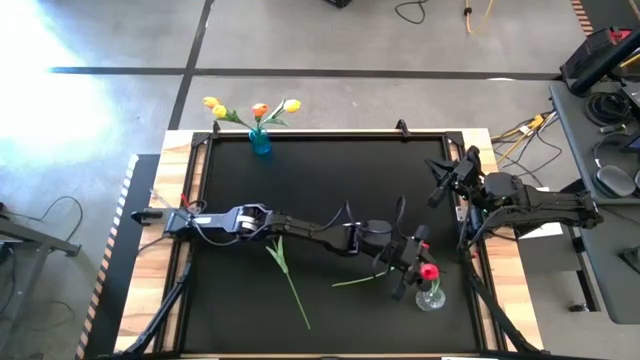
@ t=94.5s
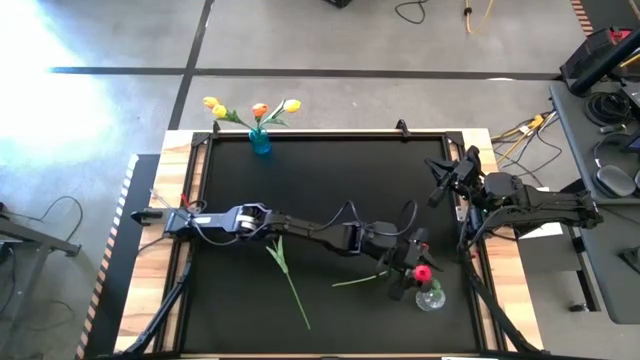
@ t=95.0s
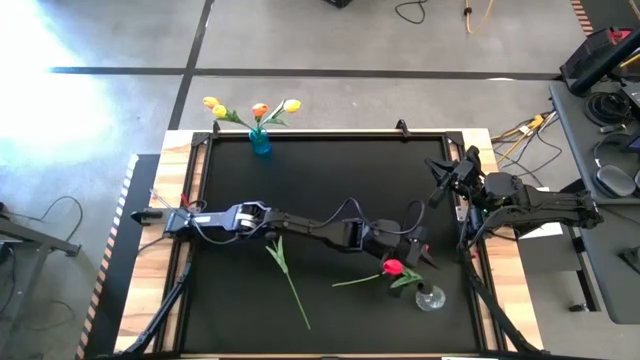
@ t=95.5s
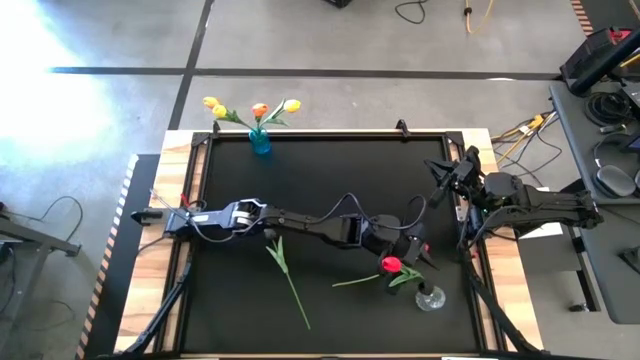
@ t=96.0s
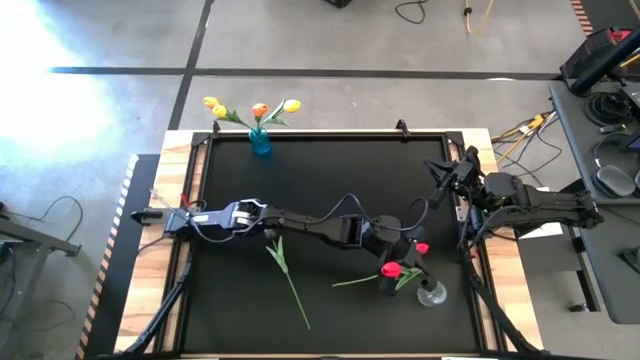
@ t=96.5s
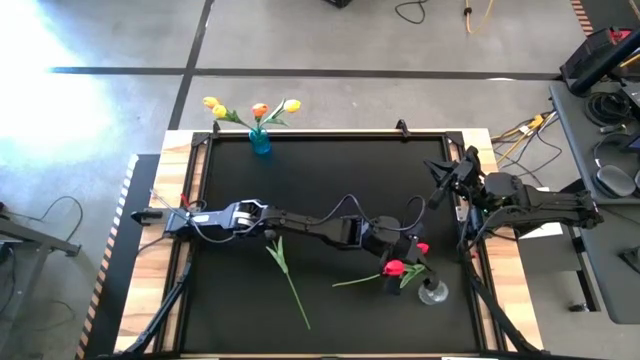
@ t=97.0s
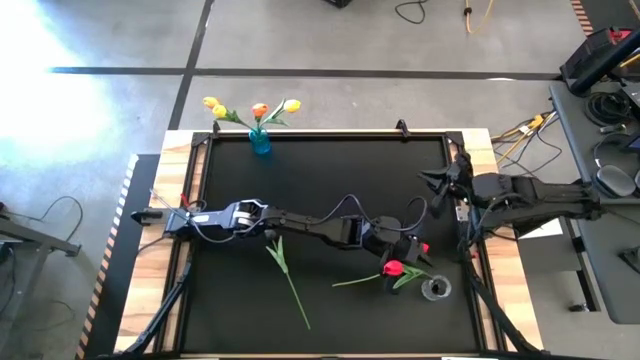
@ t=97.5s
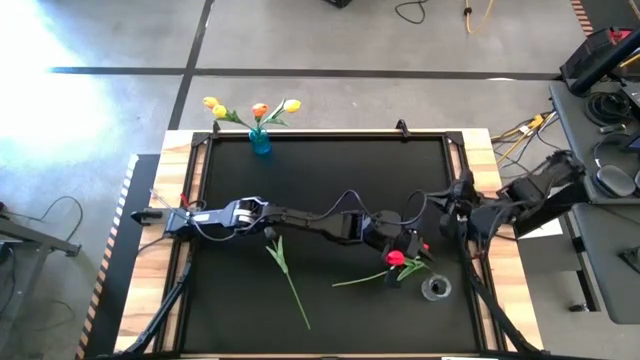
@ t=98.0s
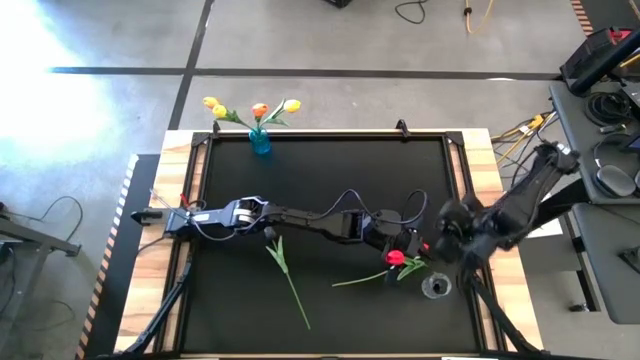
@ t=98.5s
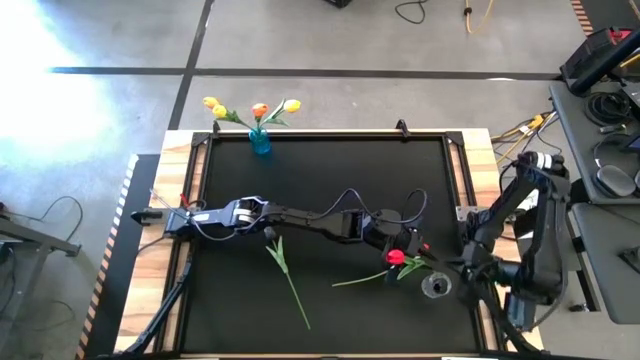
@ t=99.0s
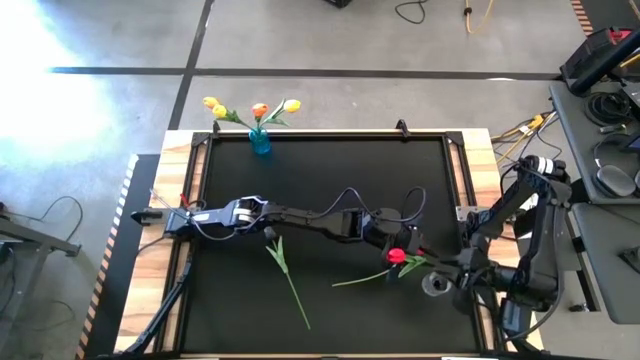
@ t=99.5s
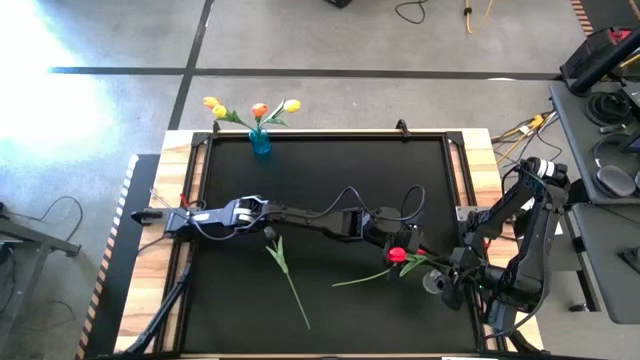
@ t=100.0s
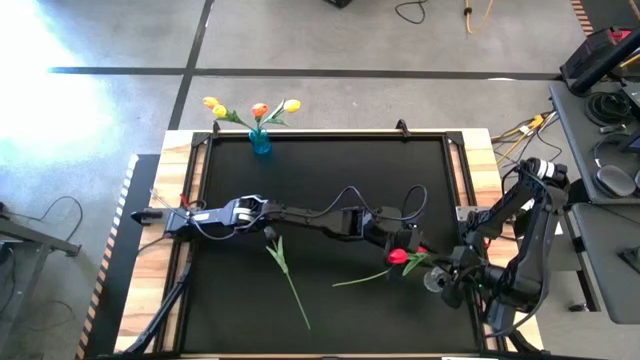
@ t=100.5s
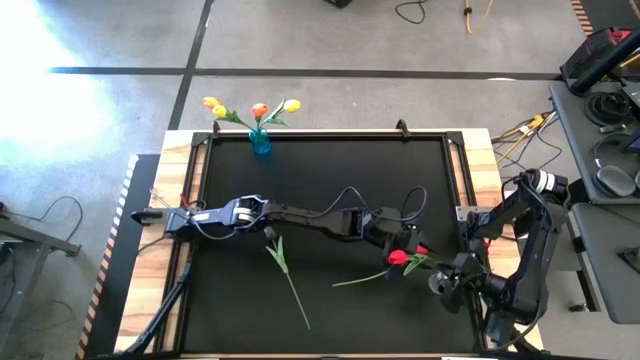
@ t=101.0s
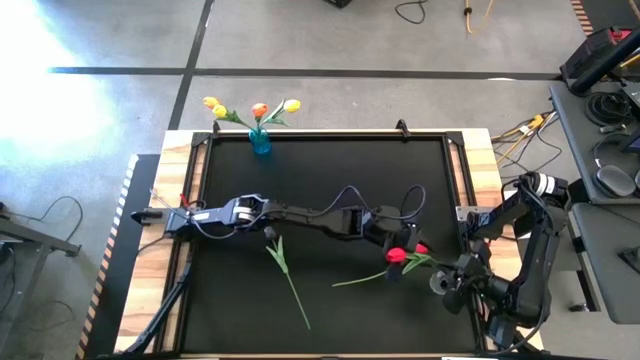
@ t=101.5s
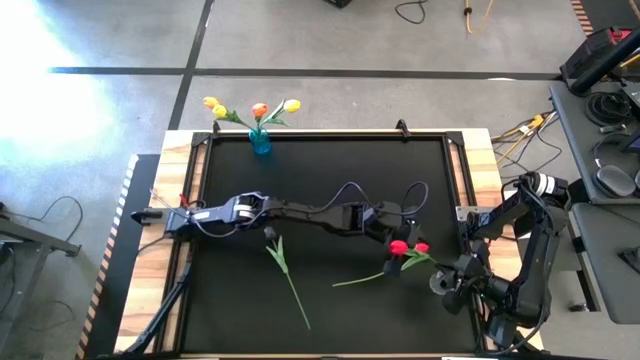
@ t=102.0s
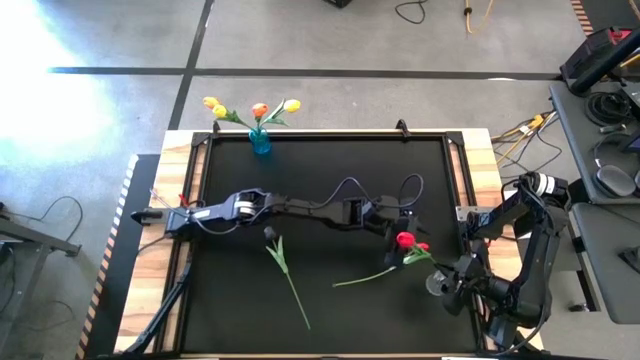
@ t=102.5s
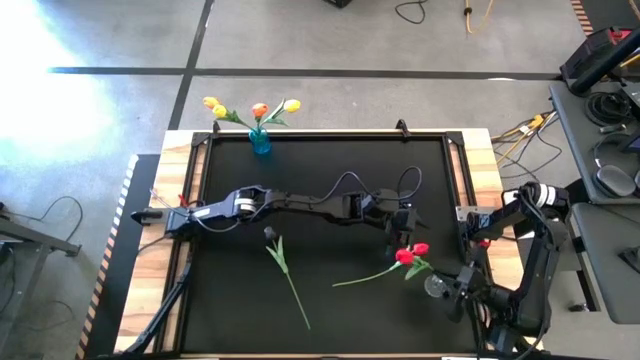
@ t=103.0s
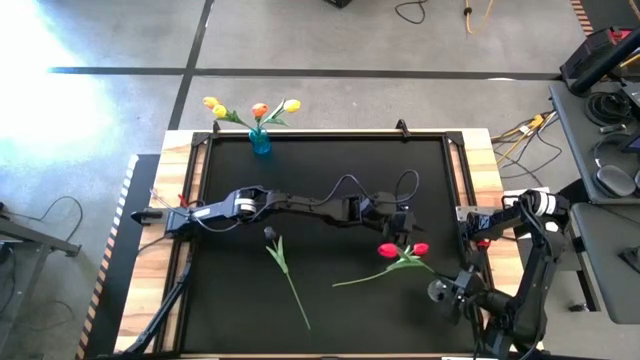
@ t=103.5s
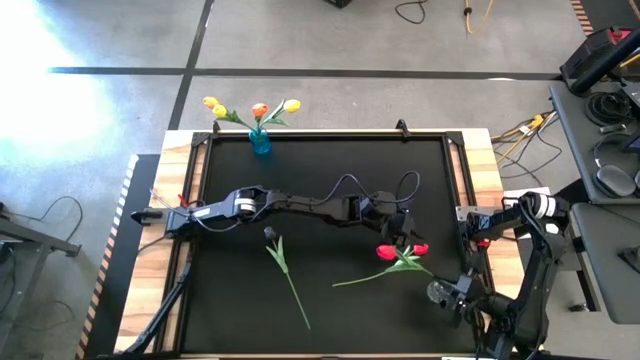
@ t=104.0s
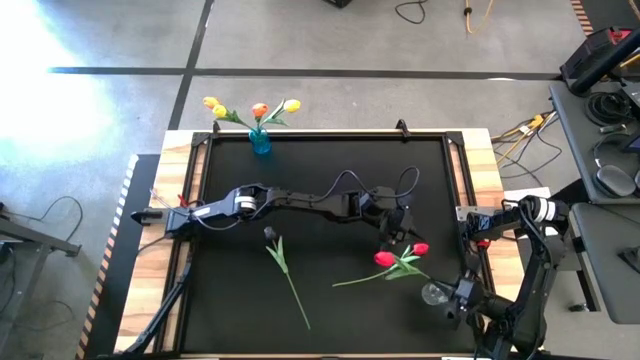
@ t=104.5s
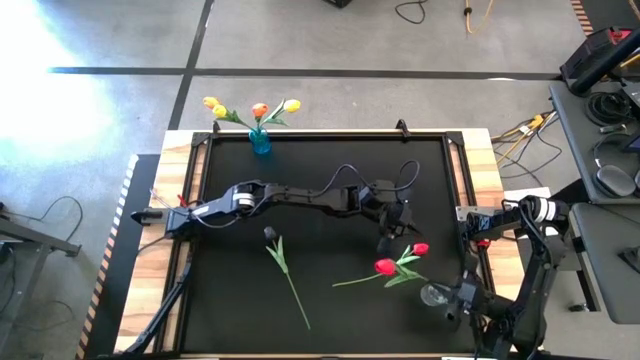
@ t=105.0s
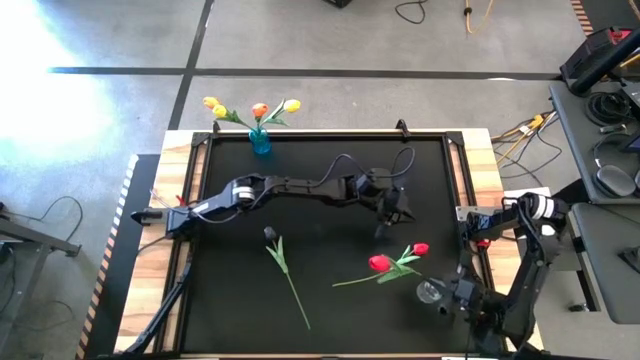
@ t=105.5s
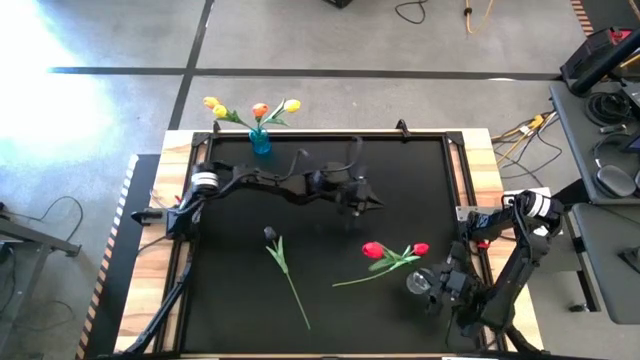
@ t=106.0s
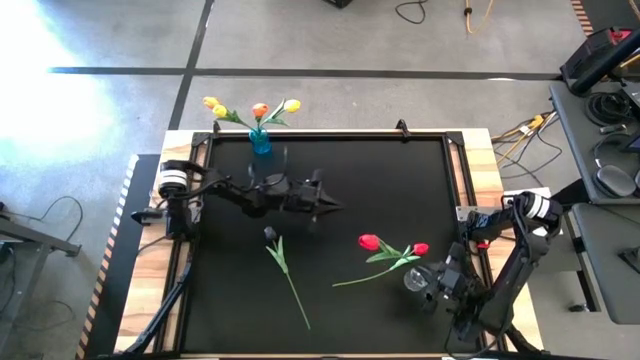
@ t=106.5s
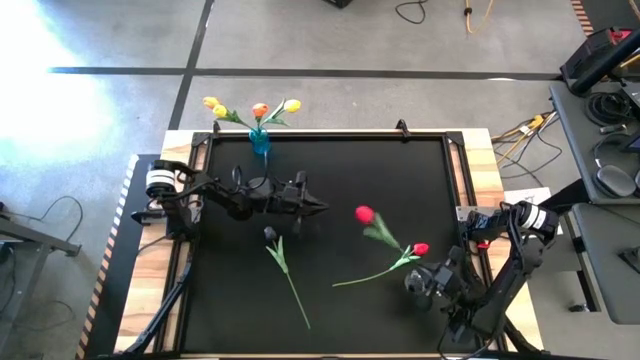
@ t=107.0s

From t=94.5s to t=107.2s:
Task: Sort flowers into vase by color
Put the top red flower into the transparent vase

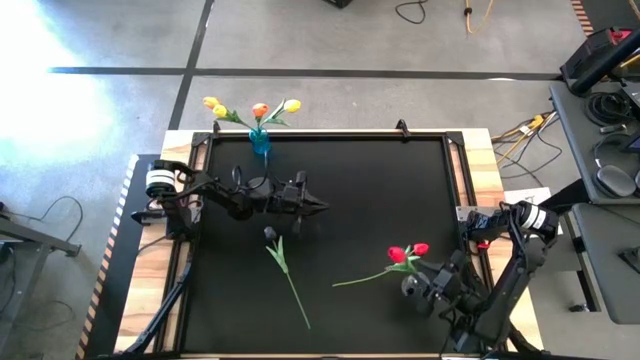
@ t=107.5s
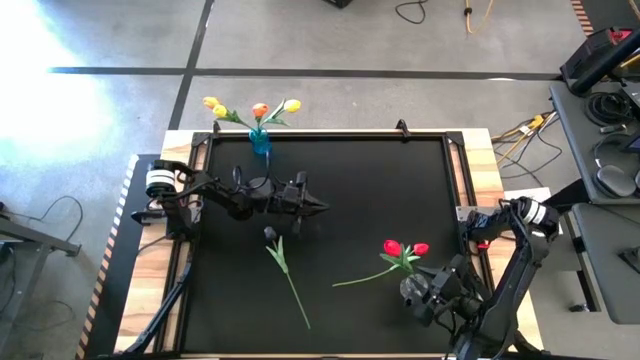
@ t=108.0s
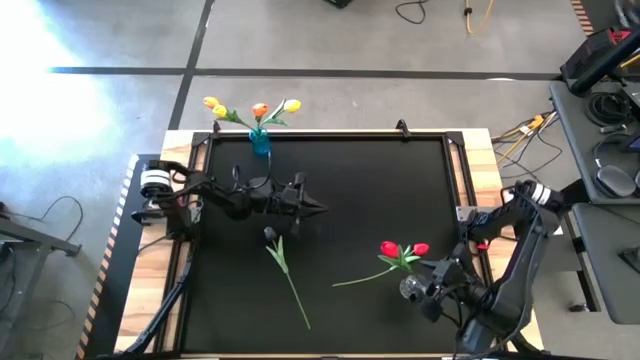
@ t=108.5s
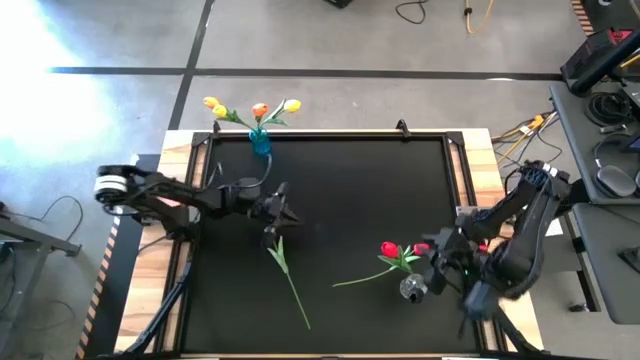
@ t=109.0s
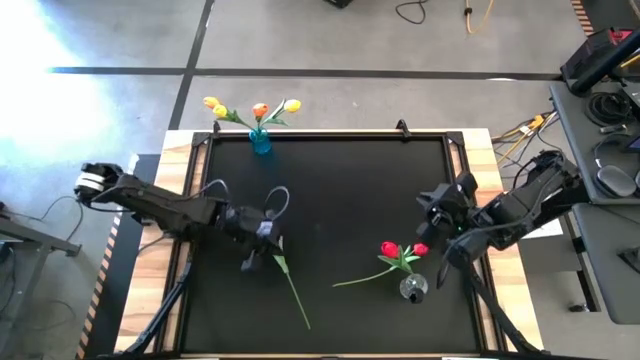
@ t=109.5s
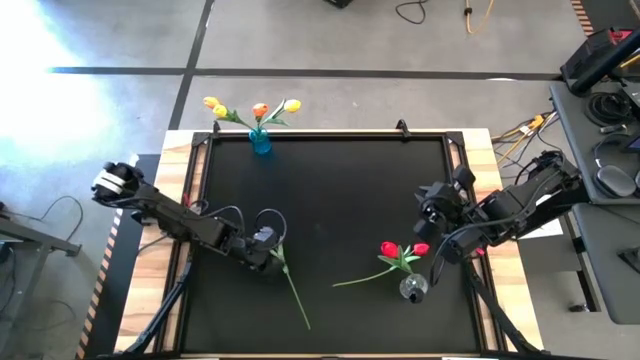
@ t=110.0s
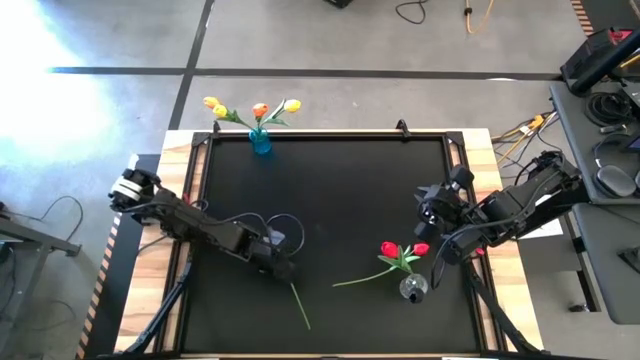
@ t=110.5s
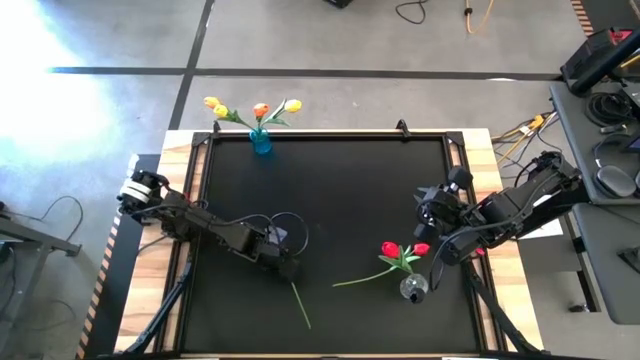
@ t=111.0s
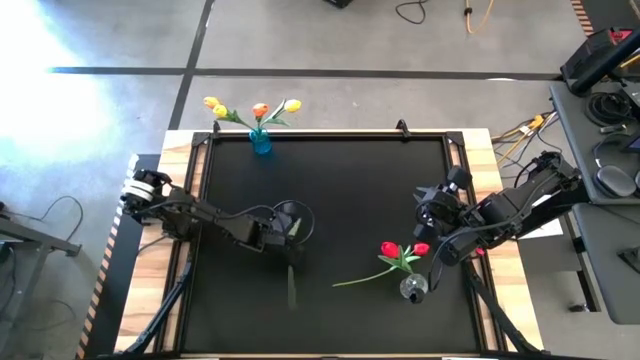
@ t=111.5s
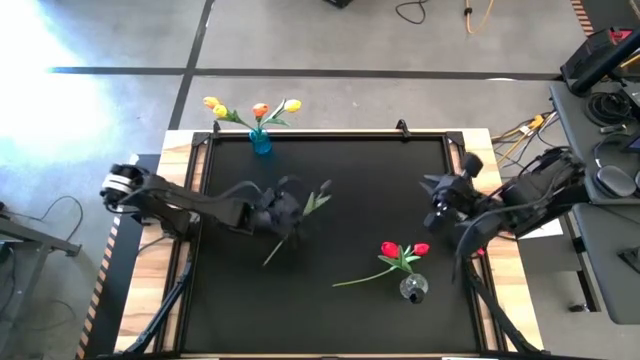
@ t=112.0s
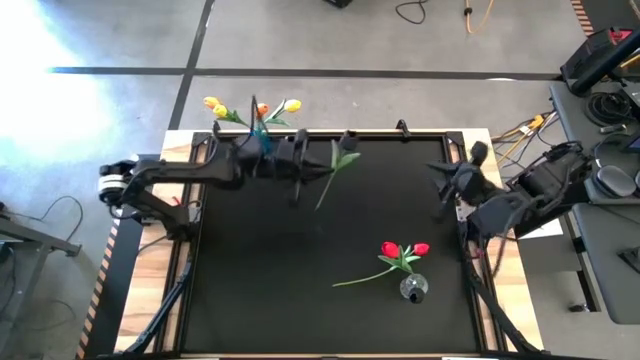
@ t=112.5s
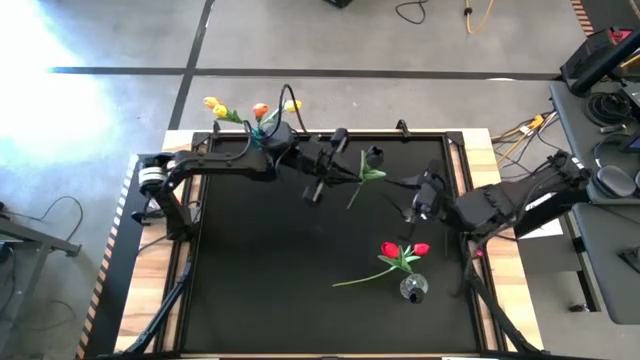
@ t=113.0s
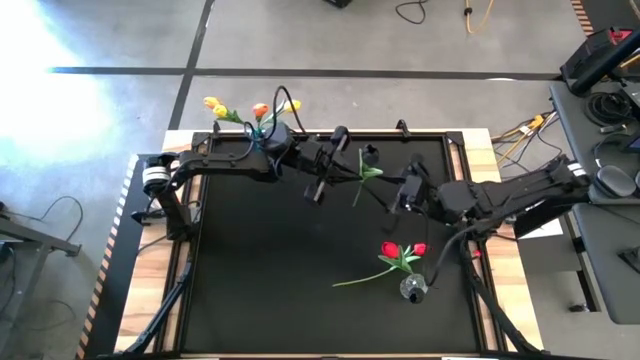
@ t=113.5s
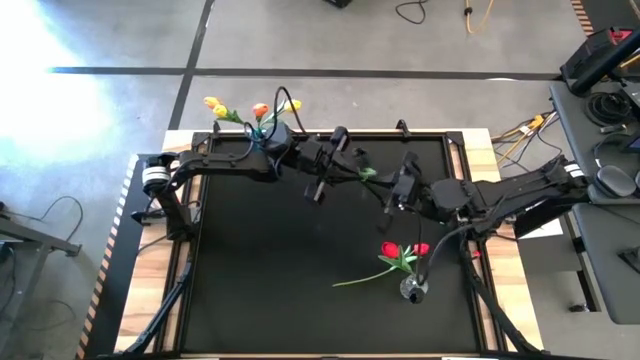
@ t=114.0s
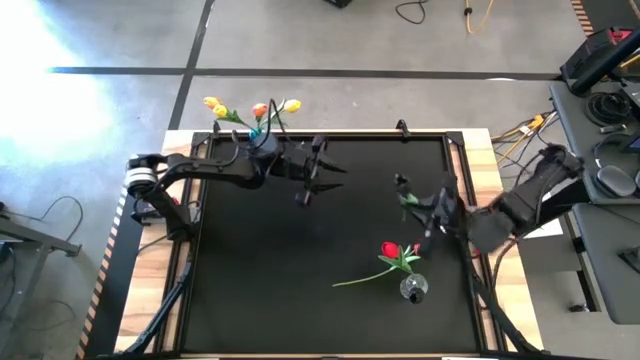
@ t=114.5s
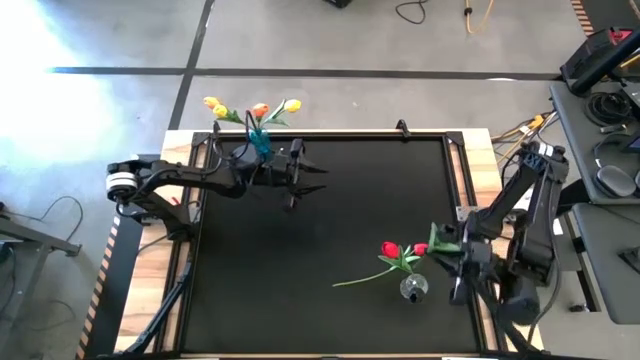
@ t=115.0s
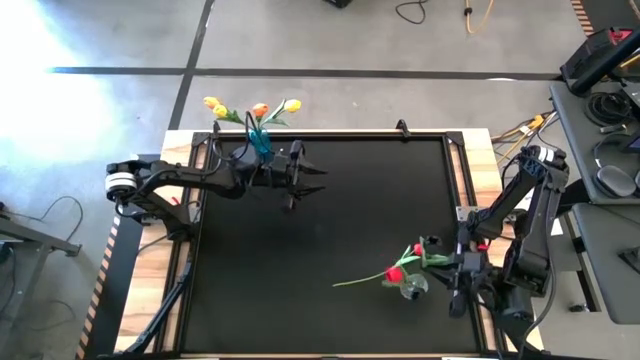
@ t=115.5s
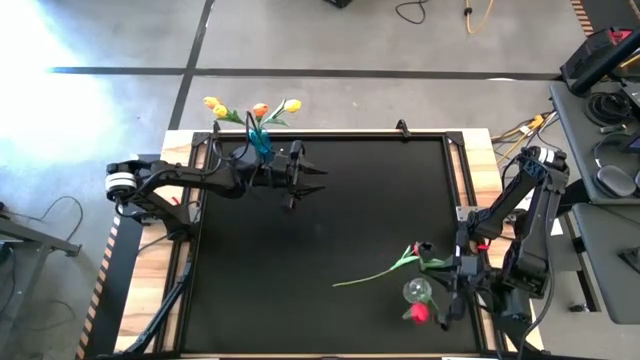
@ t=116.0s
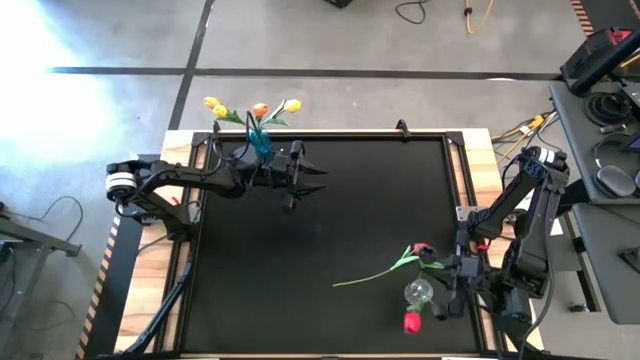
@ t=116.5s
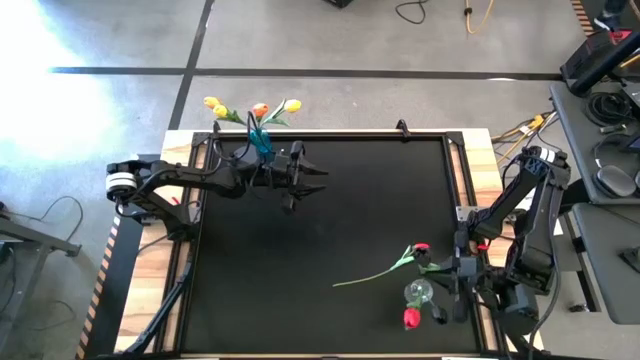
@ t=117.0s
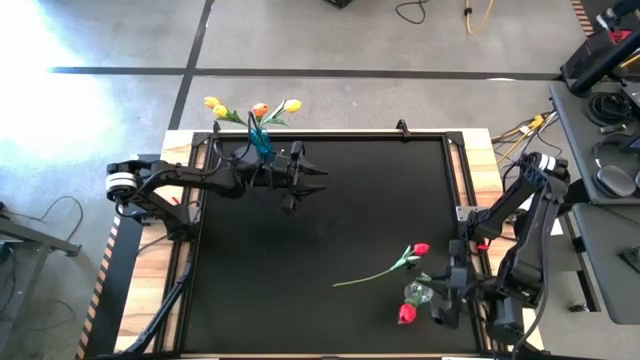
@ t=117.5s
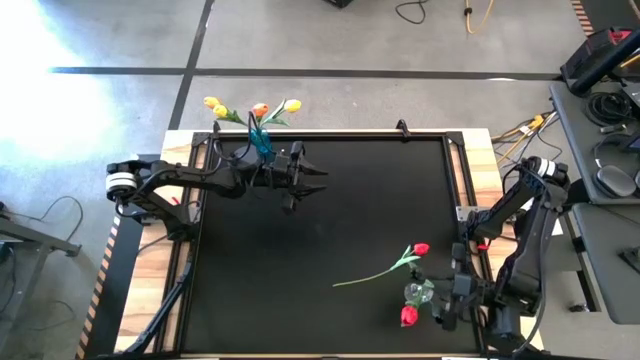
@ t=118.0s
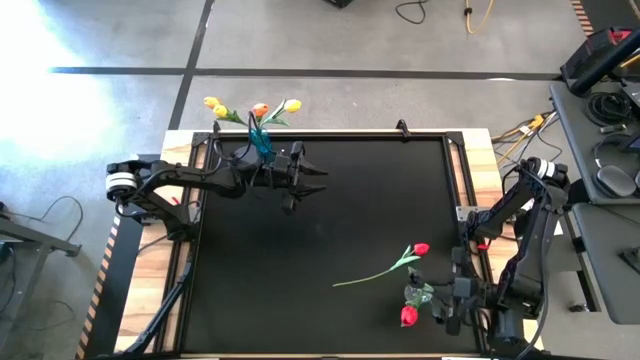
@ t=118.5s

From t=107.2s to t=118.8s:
Put the black flower into the transparent vase
